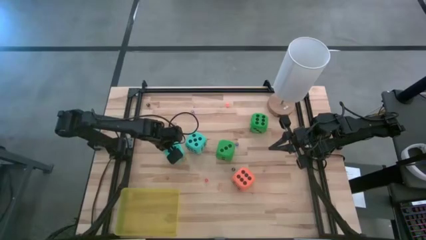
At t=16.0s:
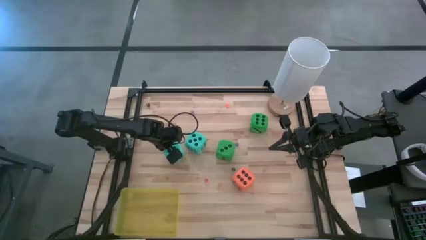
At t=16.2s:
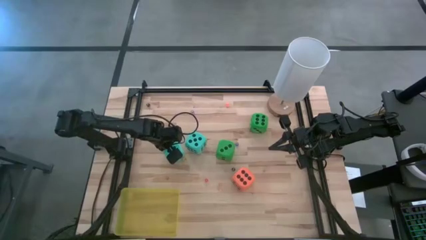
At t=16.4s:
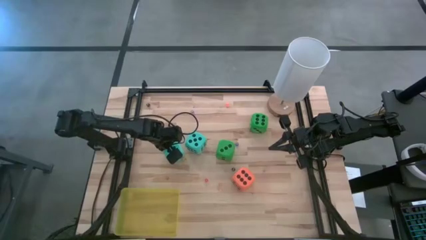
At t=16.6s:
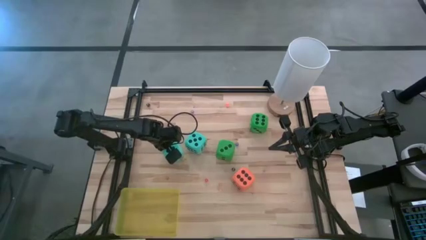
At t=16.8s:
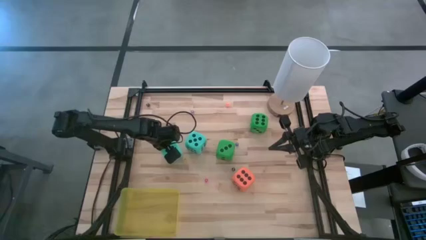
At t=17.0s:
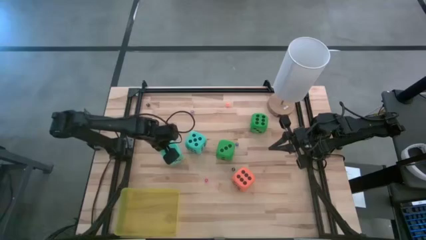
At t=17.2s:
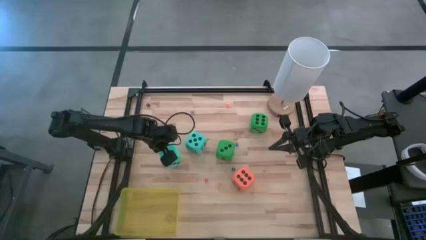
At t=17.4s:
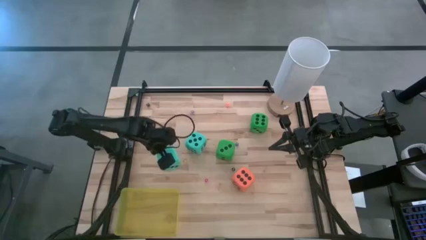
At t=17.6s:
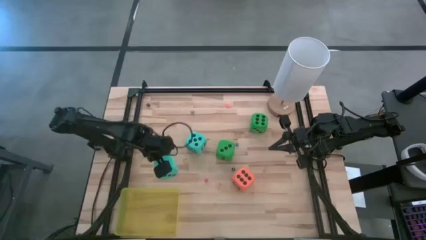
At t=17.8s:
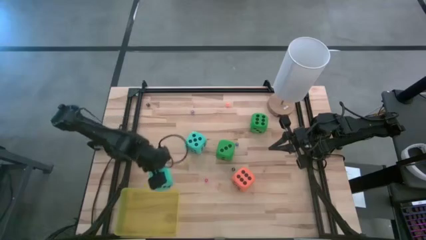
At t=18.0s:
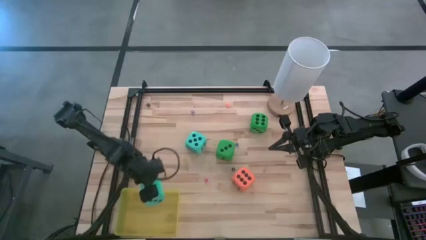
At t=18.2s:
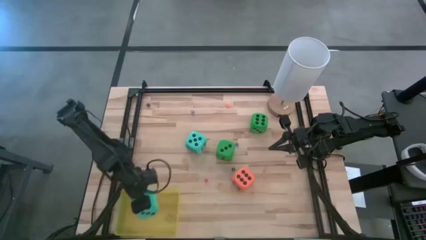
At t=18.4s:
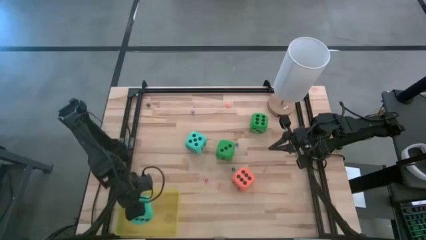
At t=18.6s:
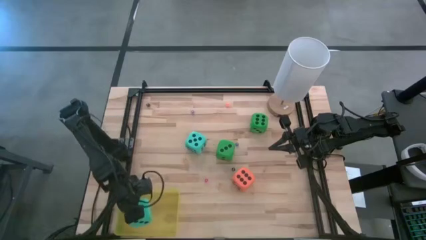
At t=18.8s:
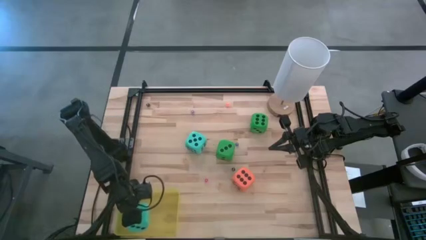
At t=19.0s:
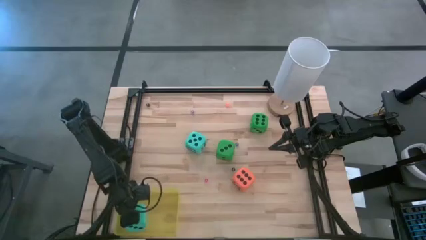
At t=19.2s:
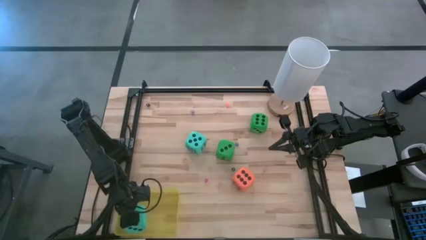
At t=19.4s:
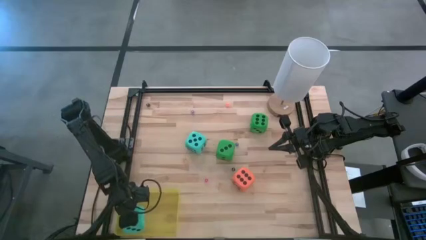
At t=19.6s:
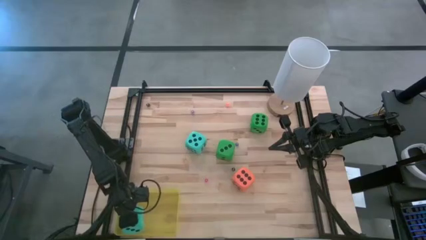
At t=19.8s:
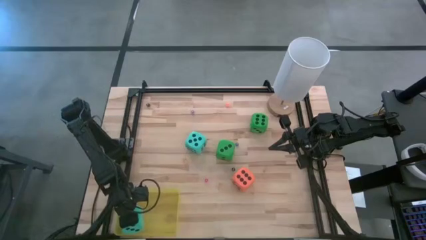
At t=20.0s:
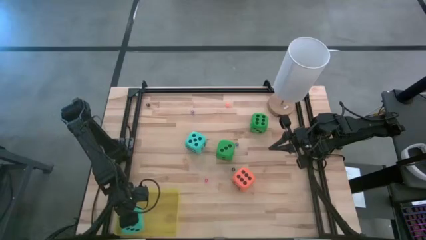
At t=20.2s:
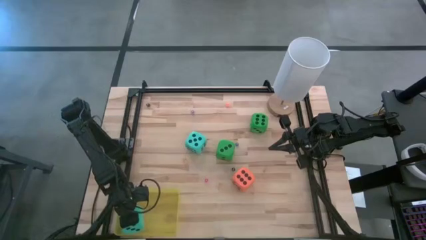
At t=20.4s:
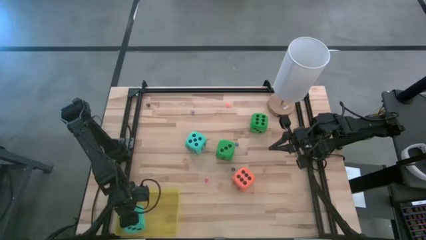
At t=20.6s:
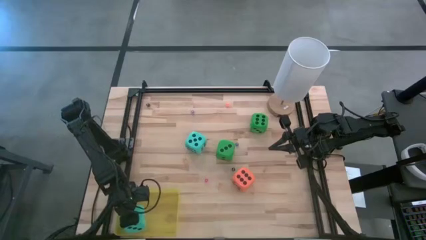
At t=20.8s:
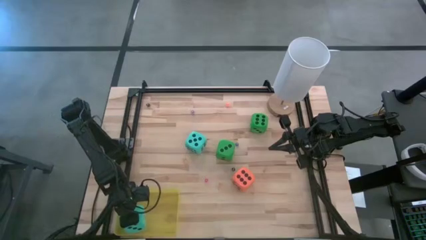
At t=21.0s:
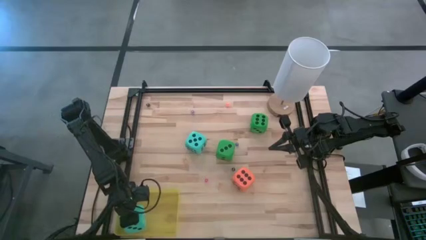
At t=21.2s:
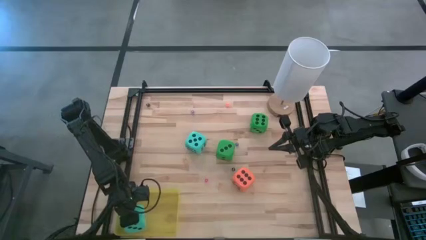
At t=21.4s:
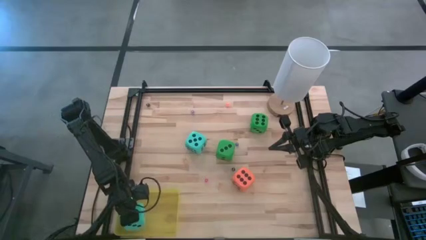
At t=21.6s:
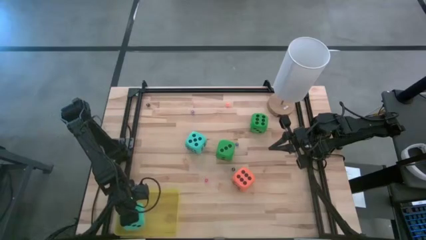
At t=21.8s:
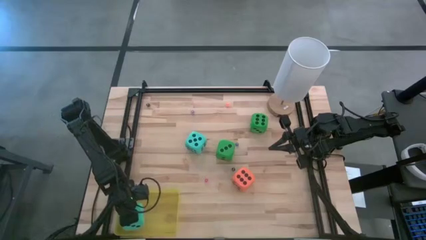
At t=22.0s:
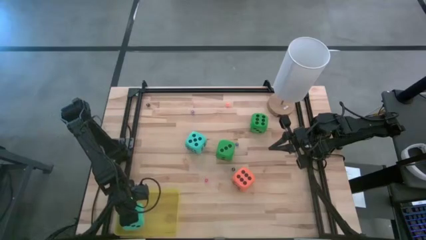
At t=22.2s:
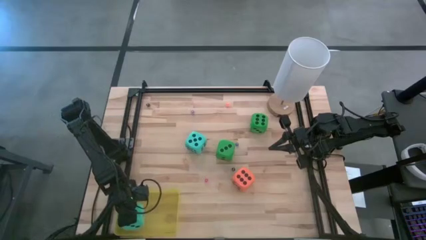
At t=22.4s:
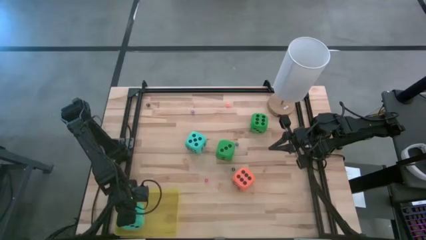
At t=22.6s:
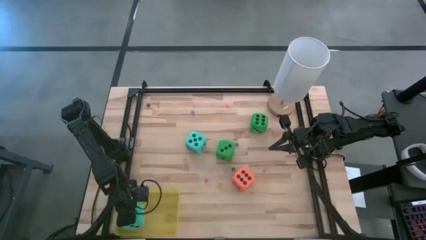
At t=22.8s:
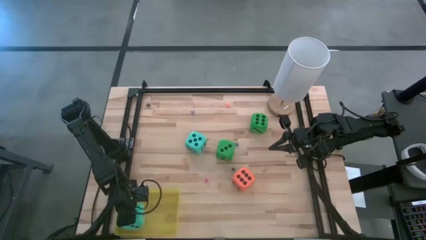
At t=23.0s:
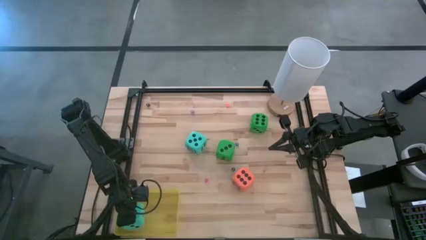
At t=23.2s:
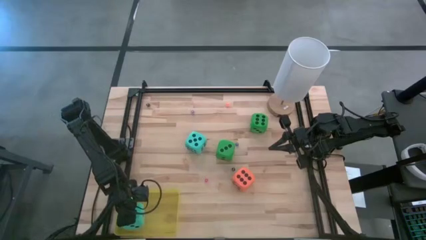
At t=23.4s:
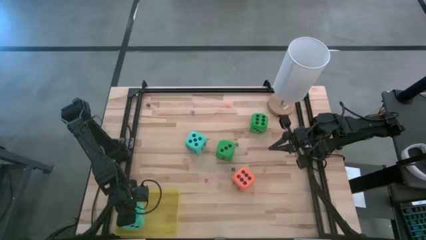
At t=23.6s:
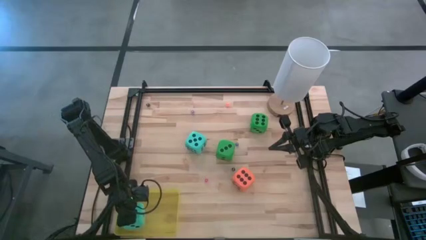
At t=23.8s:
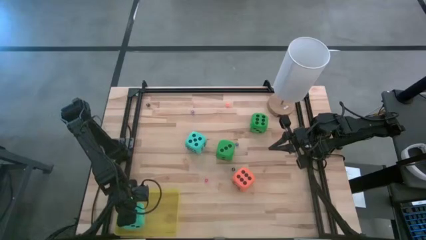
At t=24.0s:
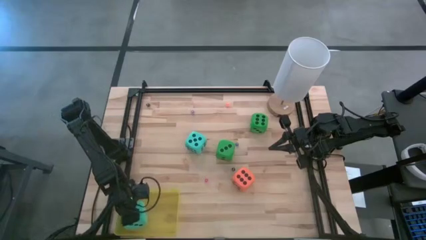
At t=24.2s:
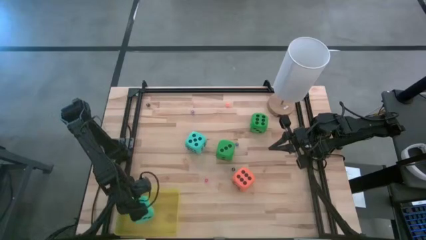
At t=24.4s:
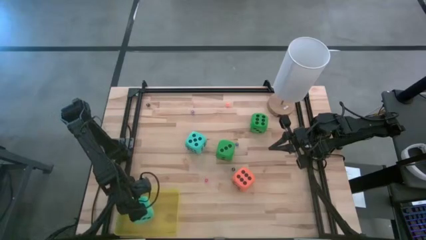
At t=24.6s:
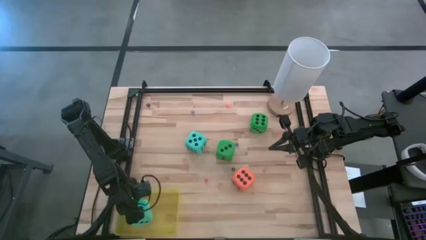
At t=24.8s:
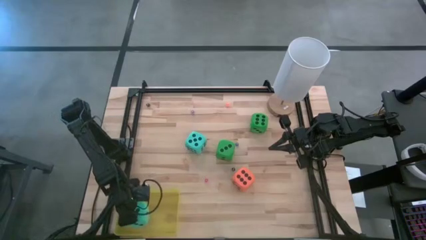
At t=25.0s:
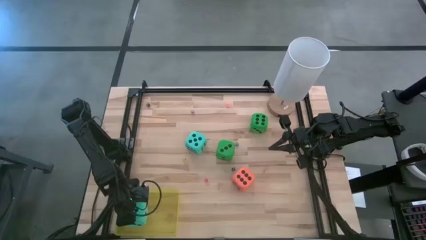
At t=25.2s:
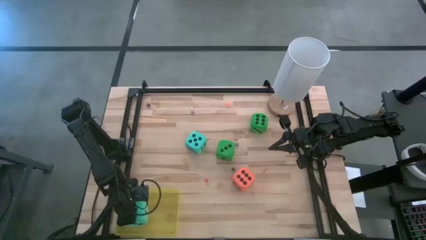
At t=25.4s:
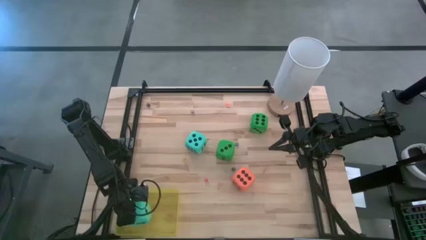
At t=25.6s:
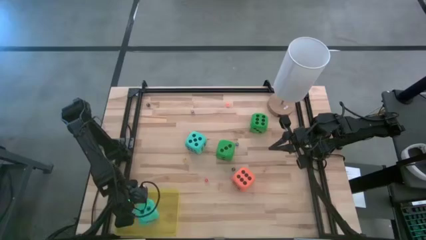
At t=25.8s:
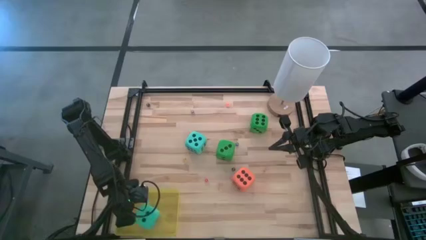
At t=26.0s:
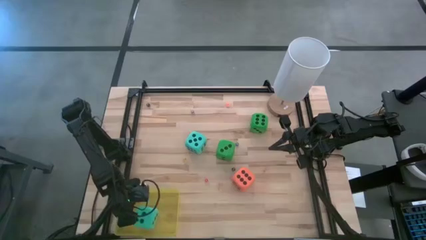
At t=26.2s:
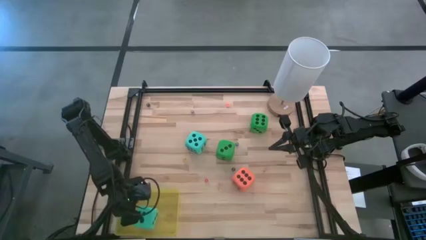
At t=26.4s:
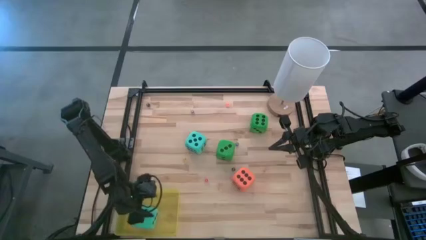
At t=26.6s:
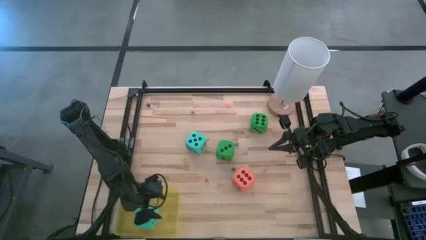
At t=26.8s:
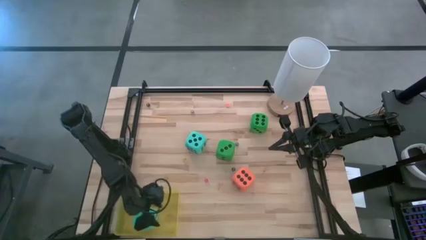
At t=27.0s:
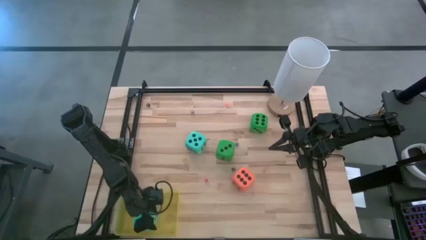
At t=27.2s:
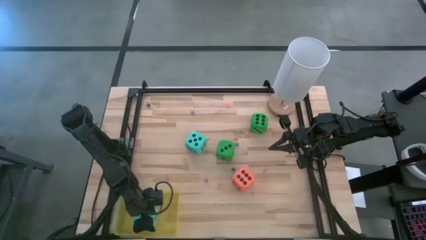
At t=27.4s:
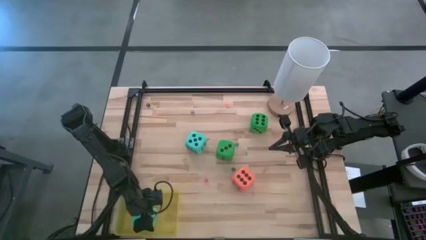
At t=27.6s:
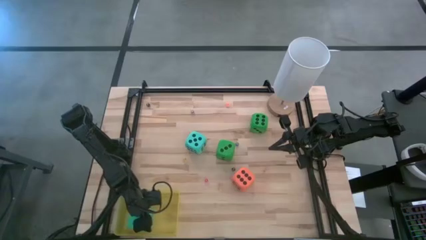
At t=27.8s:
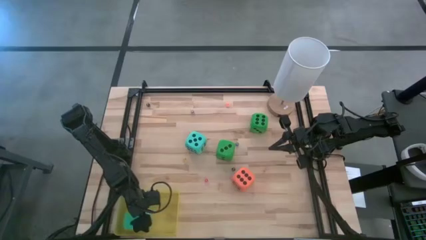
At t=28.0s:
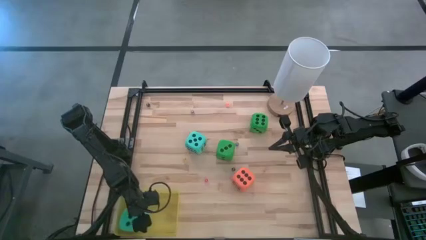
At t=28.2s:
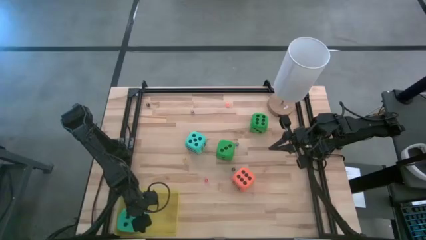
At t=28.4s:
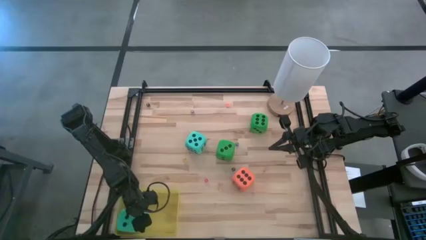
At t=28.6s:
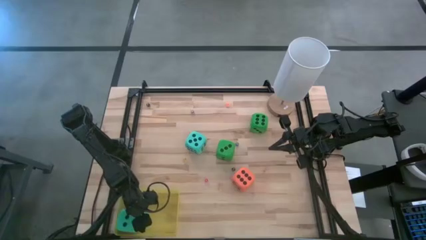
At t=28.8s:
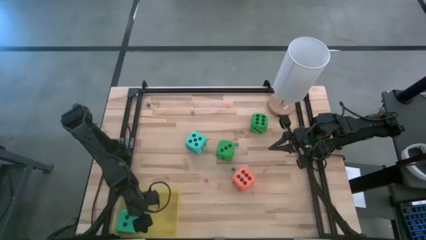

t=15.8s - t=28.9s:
Task: Pick & Place Dice
Put the left large blue dice into the yellow bin
